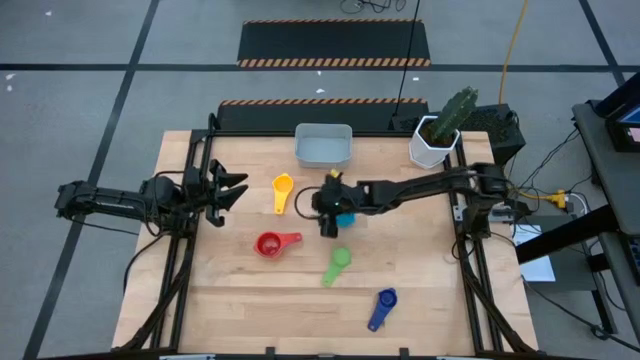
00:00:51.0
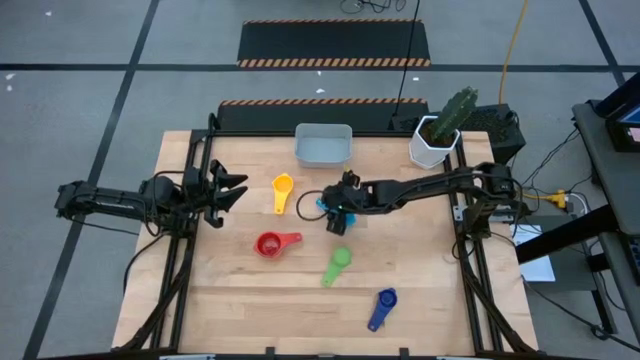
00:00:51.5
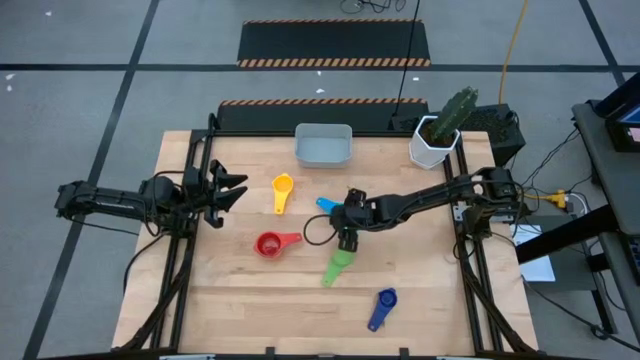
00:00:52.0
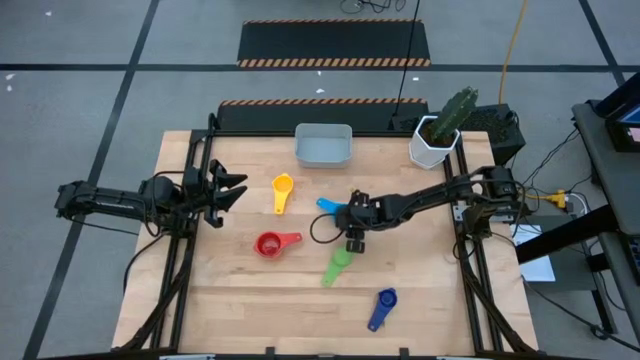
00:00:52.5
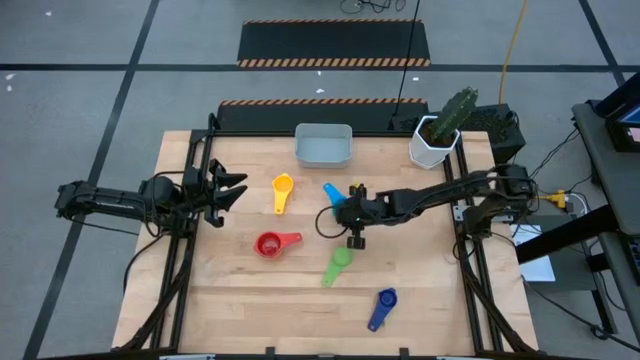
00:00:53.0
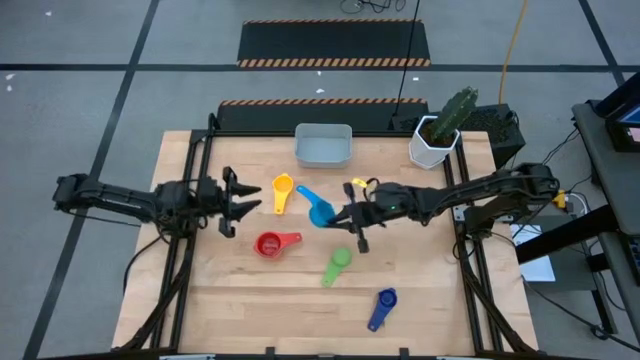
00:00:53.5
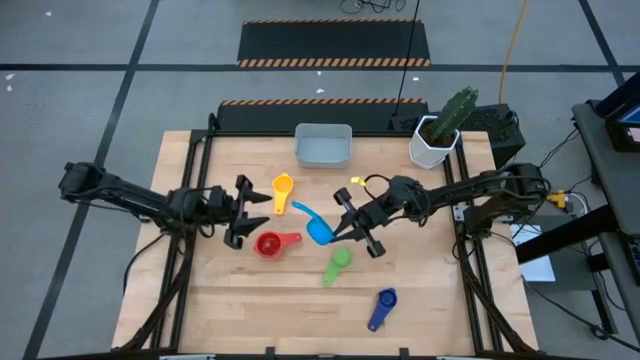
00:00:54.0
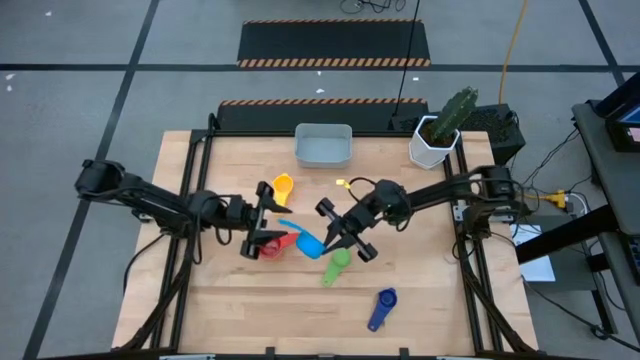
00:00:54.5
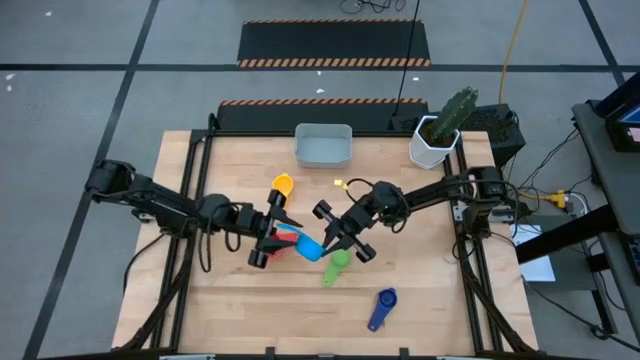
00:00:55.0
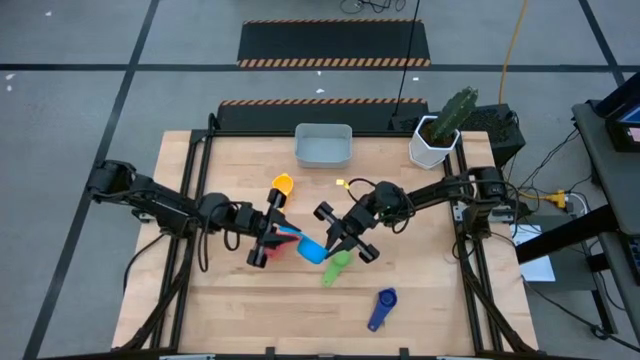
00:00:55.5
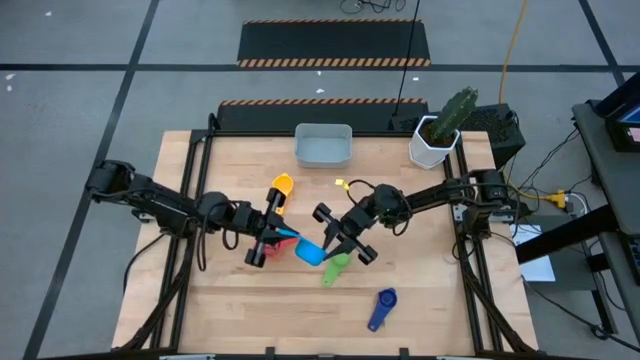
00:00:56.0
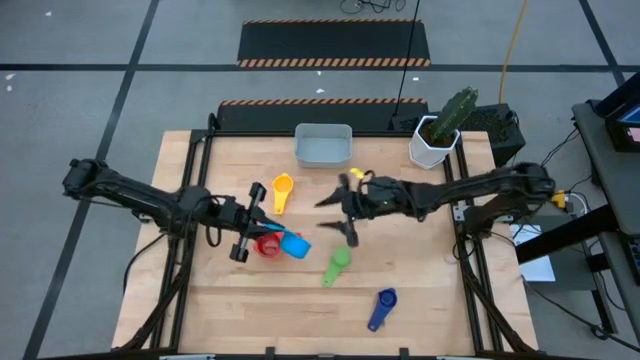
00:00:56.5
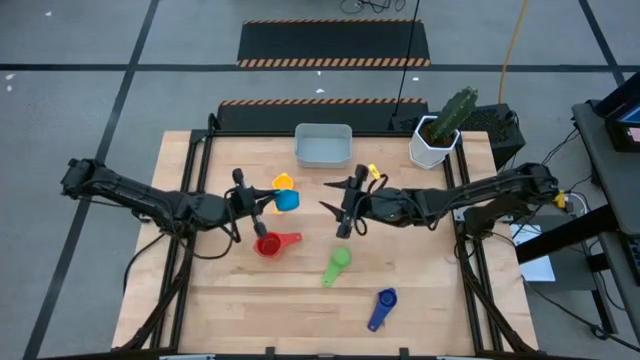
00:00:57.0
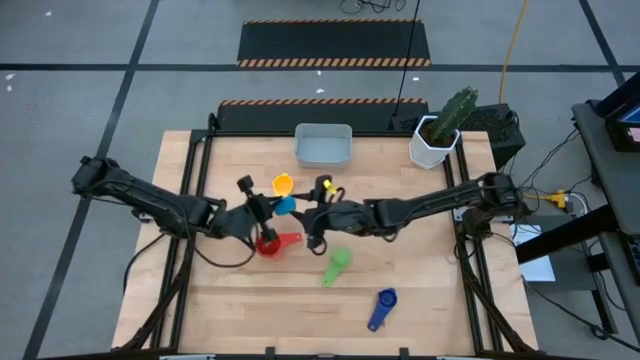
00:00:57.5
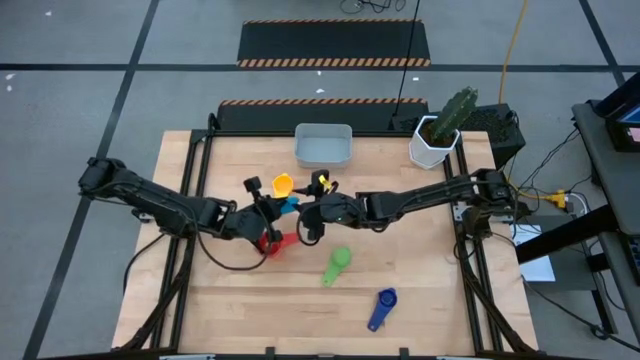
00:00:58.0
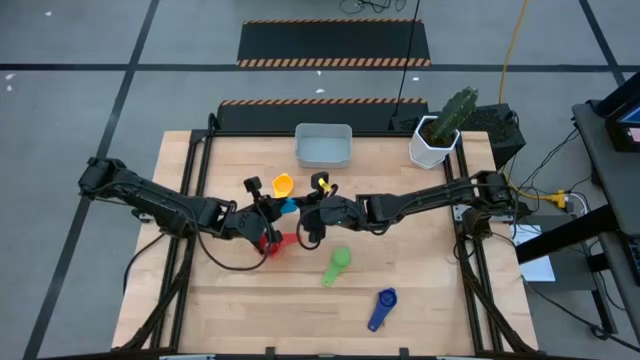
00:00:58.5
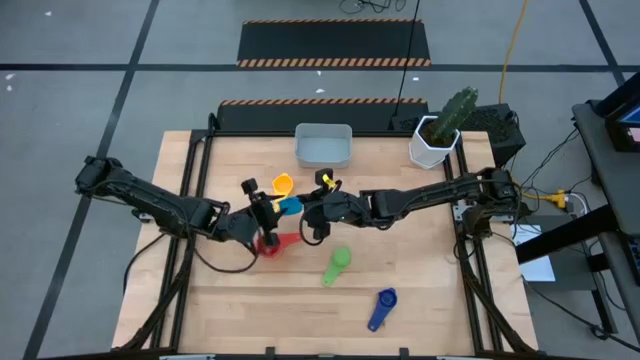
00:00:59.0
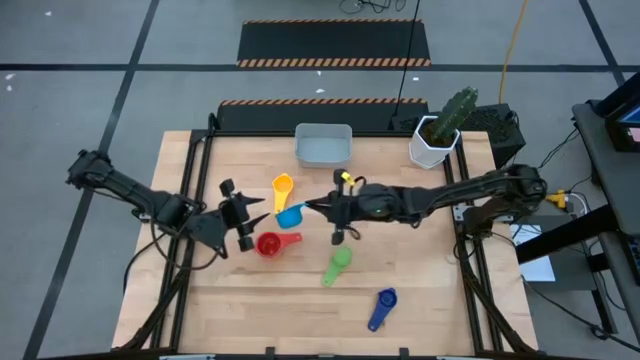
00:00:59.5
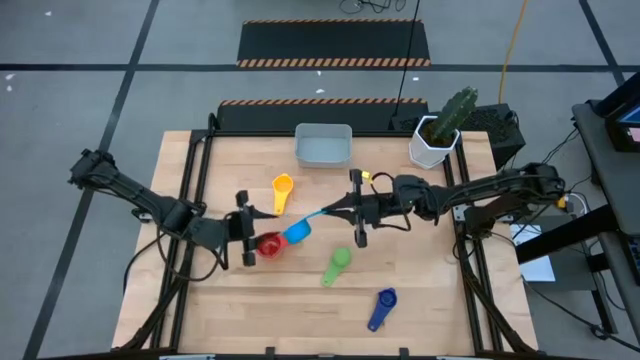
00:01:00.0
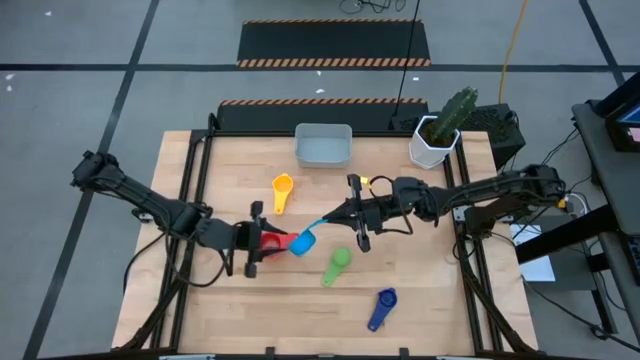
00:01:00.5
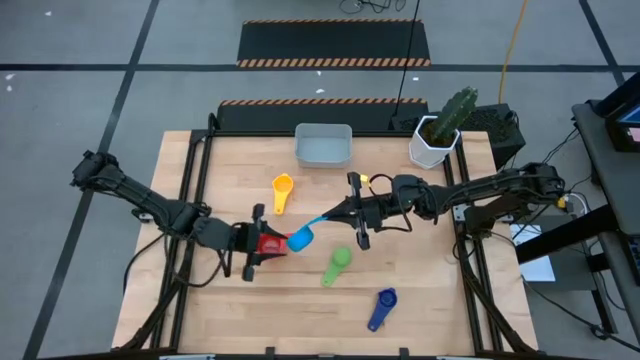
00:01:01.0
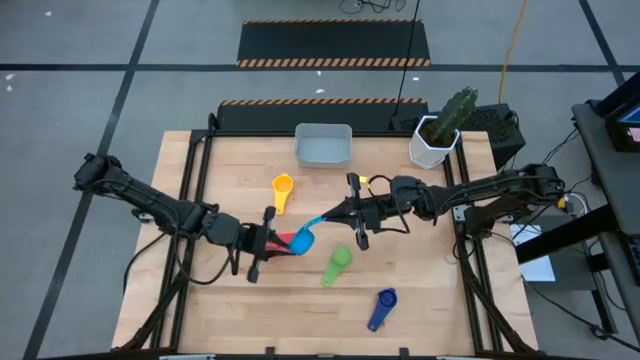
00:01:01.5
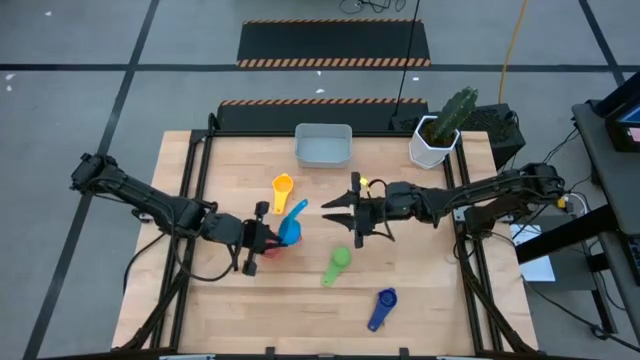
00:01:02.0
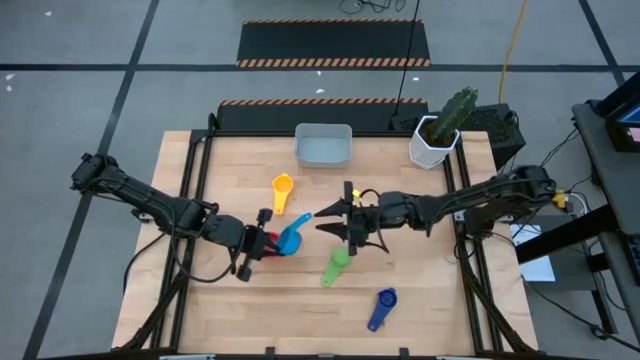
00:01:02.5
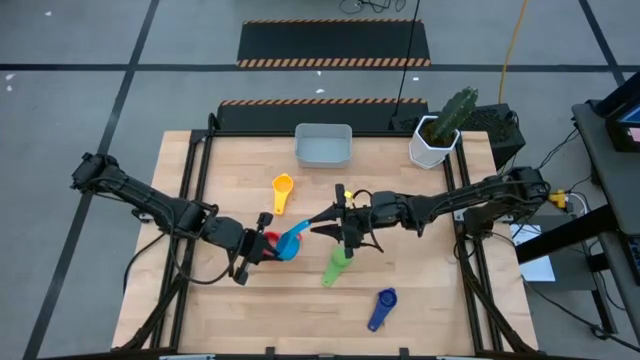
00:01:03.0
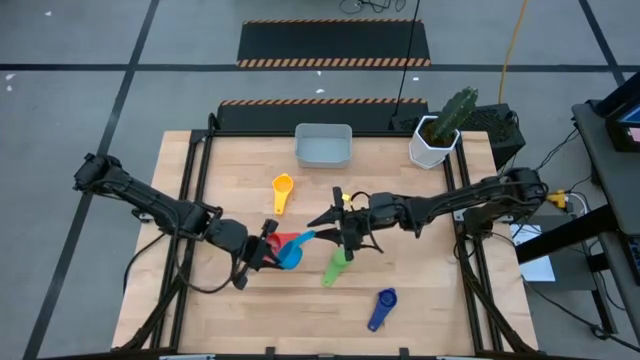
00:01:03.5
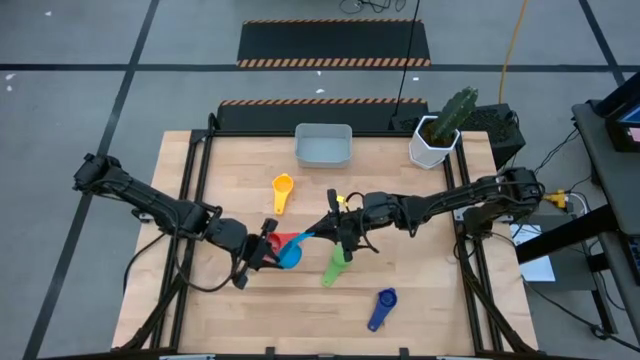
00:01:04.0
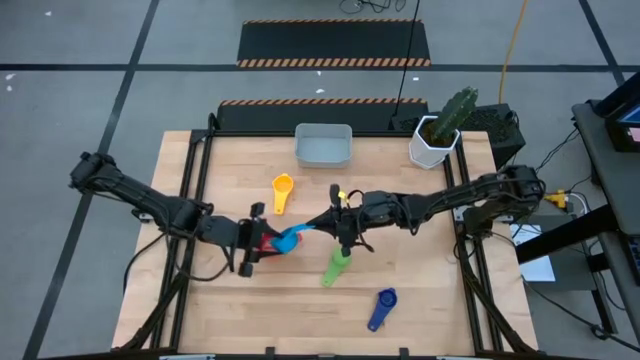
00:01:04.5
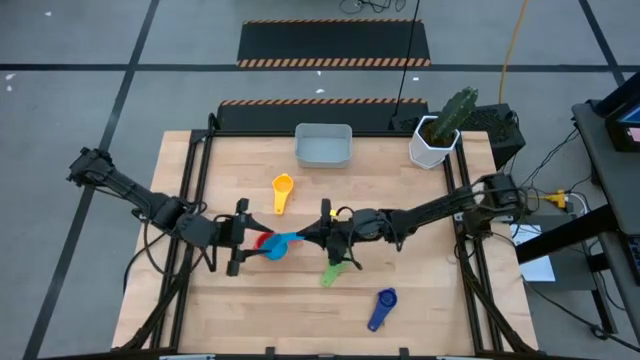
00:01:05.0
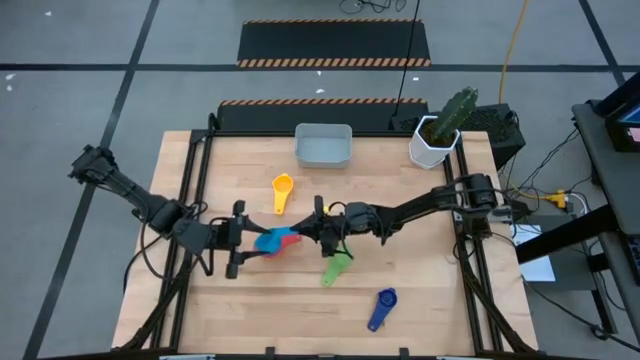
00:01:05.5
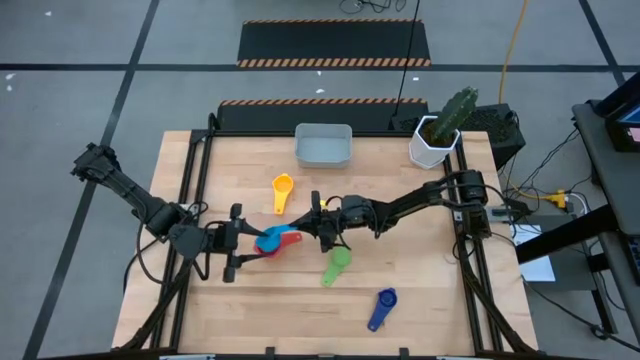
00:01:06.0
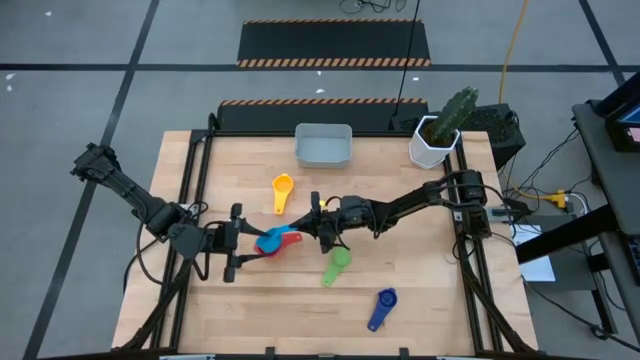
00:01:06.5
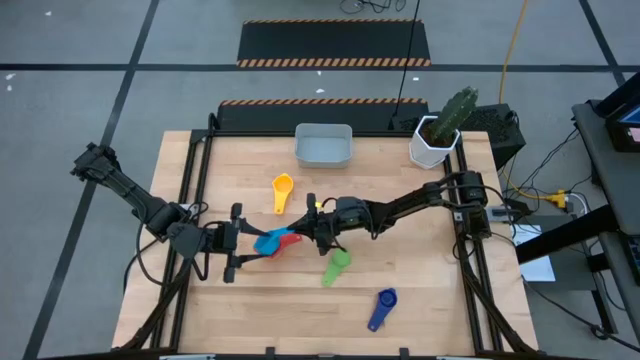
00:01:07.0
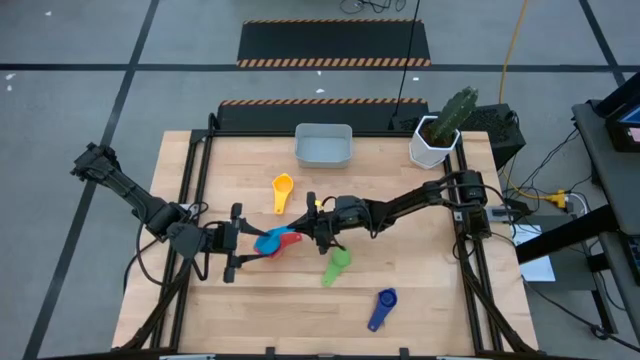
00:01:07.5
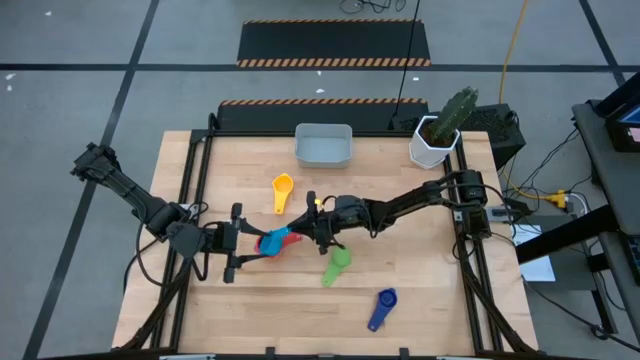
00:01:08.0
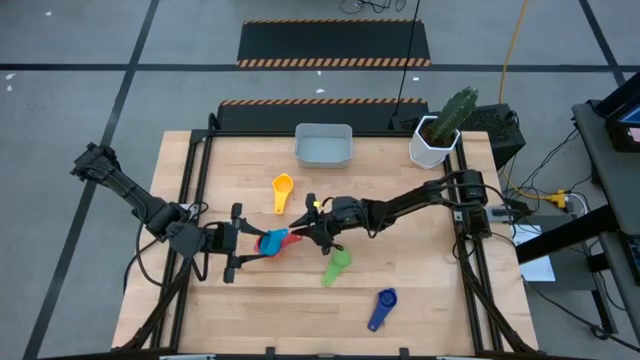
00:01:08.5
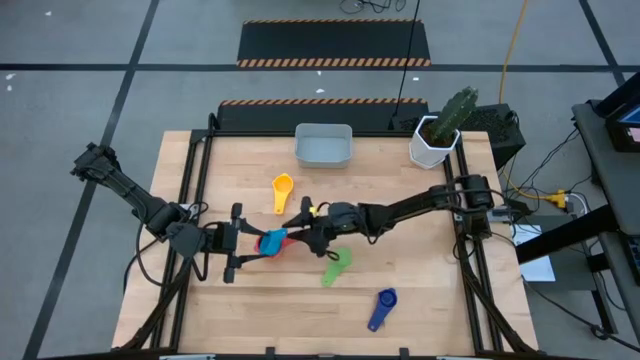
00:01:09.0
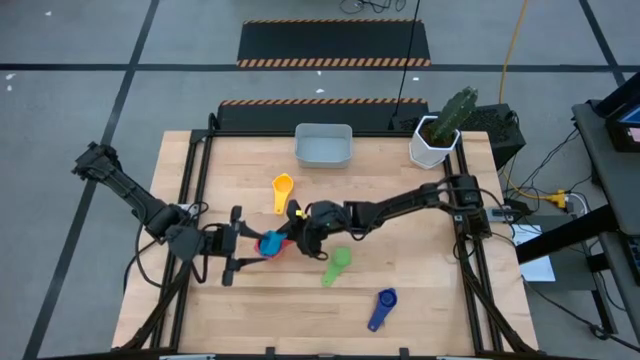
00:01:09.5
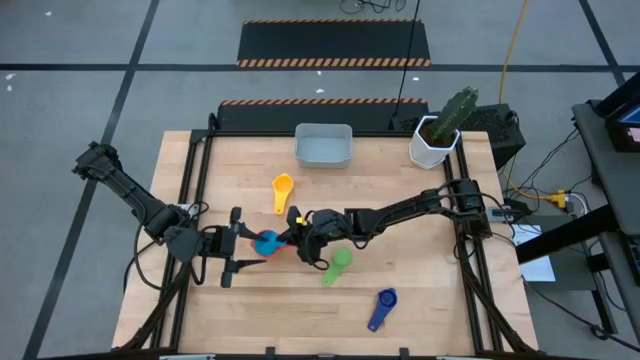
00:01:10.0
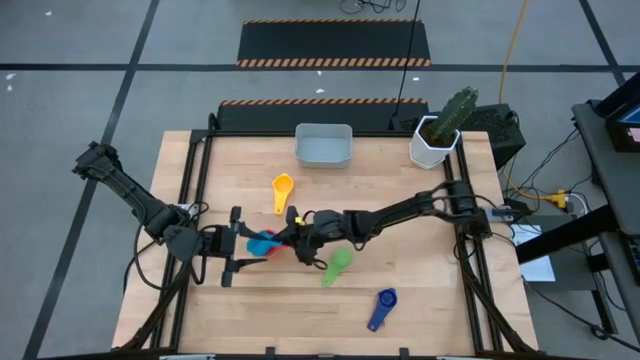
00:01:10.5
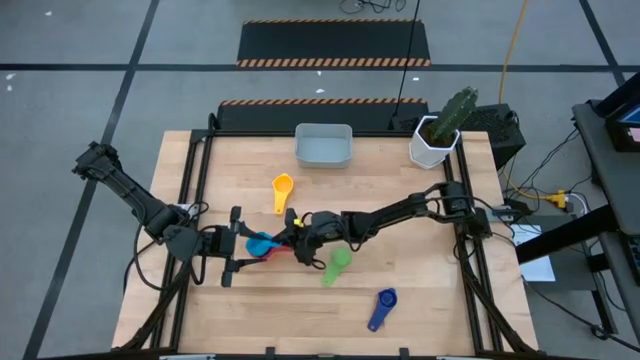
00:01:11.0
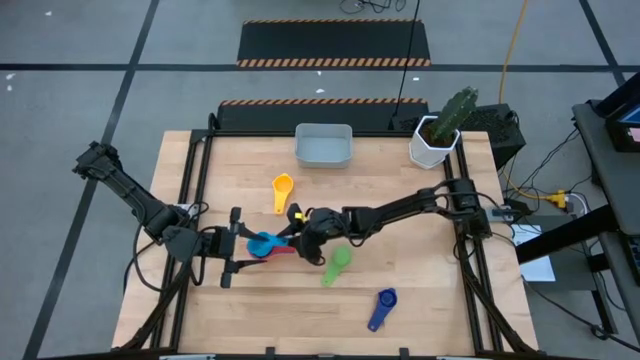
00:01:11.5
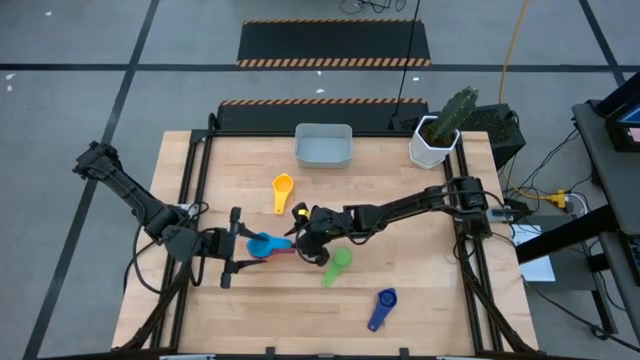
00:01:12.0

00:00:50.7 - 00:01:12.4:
Task: Nest measuring cups in basket
Stack the light blue measuring cup into the red measuring cup
